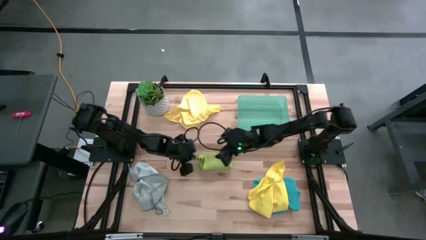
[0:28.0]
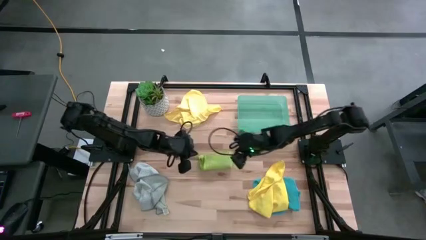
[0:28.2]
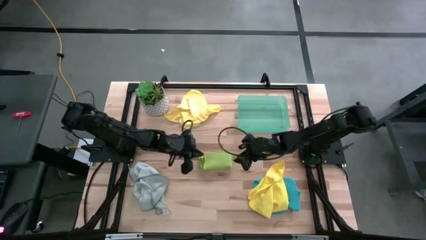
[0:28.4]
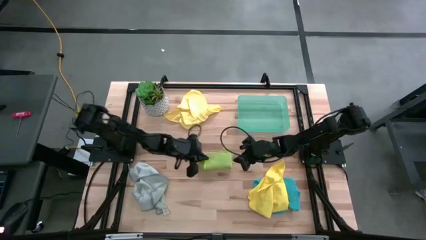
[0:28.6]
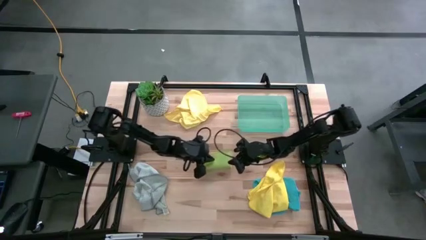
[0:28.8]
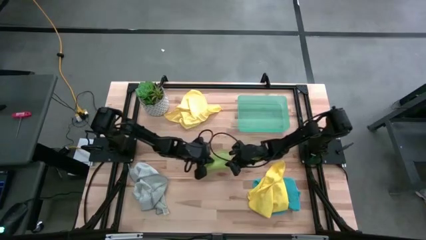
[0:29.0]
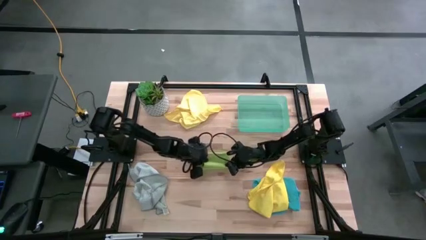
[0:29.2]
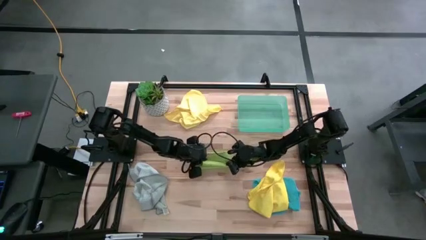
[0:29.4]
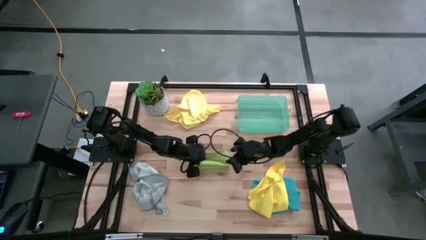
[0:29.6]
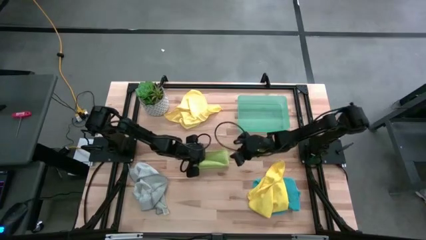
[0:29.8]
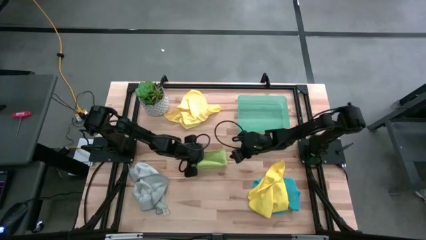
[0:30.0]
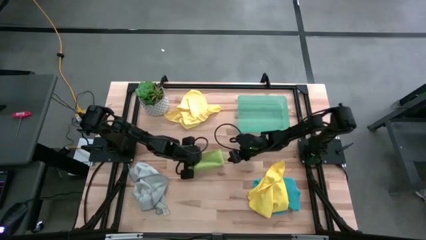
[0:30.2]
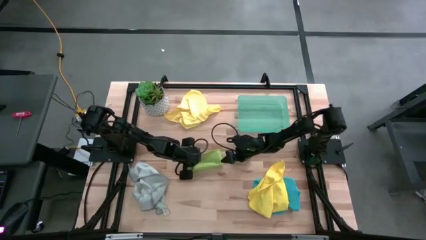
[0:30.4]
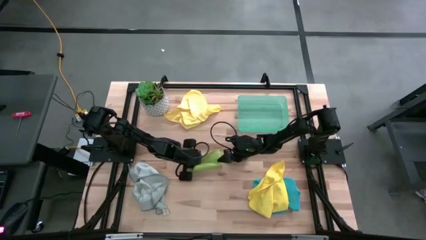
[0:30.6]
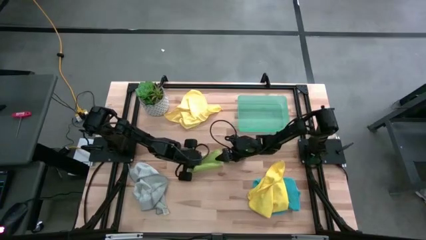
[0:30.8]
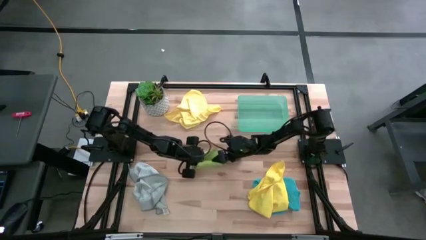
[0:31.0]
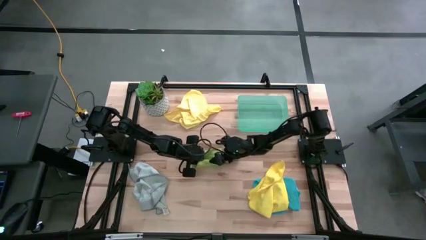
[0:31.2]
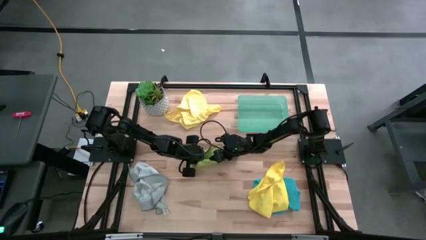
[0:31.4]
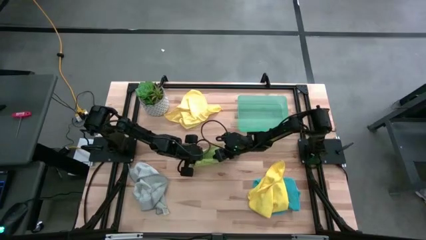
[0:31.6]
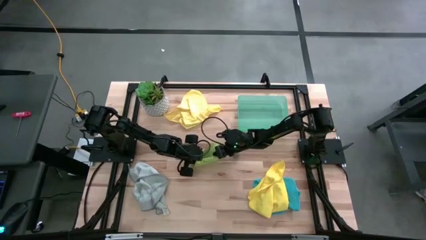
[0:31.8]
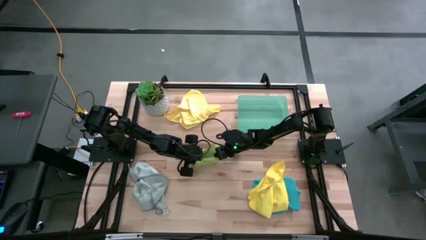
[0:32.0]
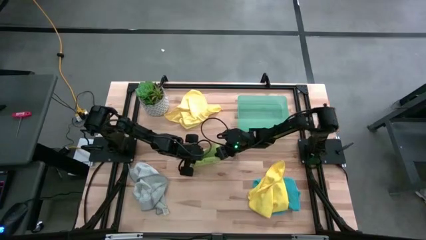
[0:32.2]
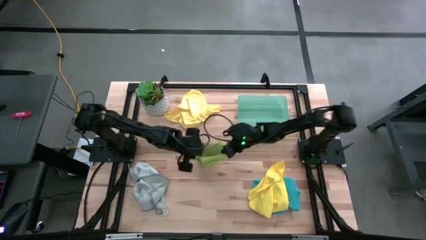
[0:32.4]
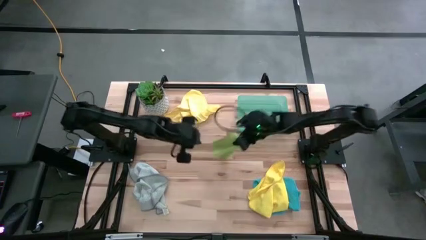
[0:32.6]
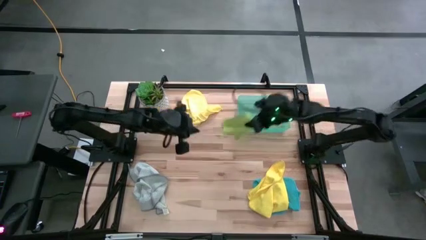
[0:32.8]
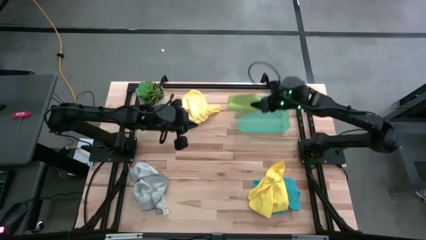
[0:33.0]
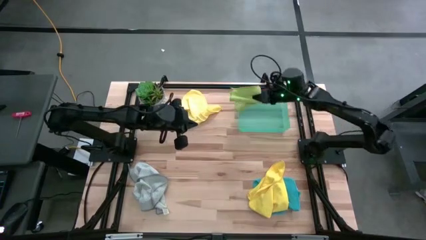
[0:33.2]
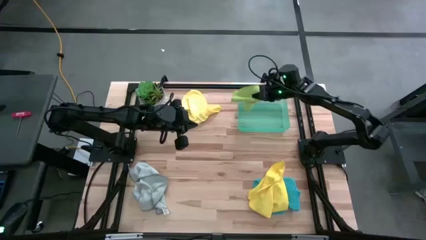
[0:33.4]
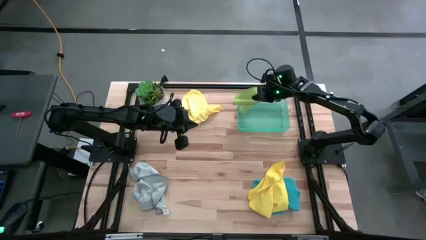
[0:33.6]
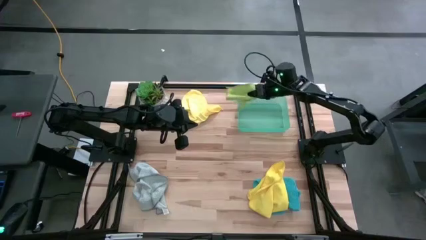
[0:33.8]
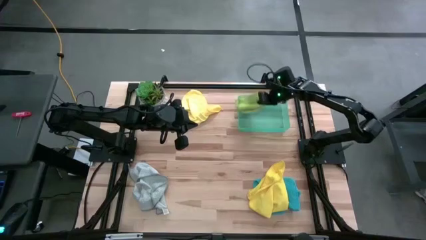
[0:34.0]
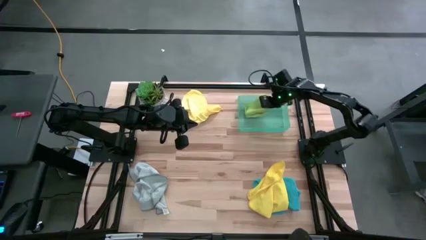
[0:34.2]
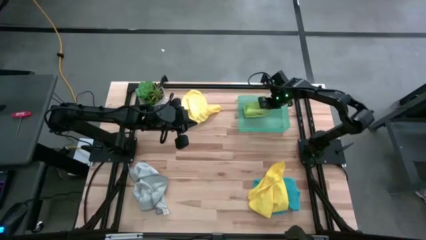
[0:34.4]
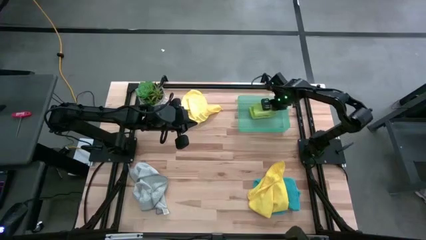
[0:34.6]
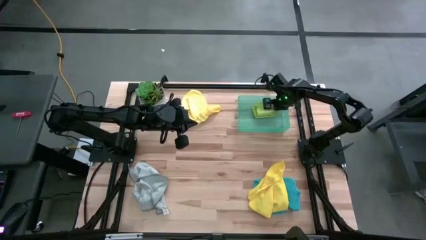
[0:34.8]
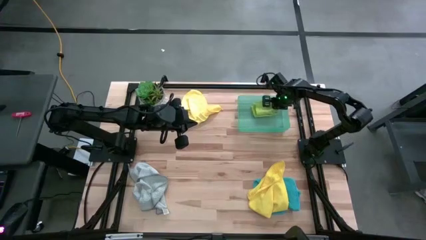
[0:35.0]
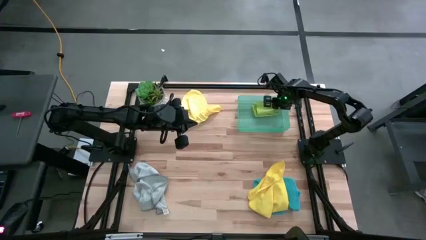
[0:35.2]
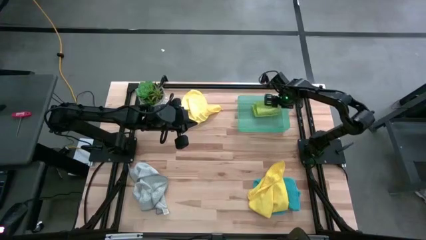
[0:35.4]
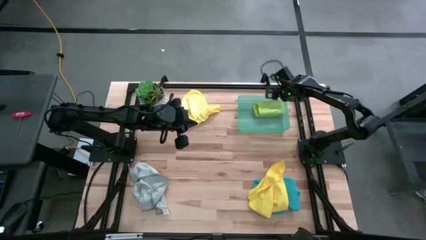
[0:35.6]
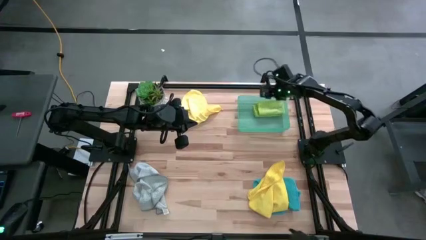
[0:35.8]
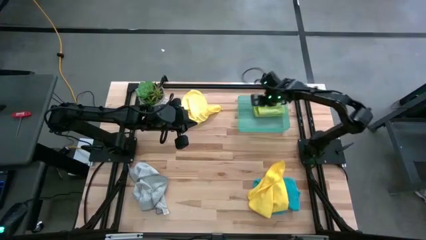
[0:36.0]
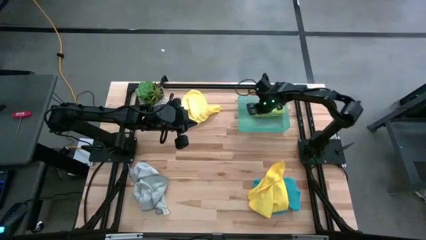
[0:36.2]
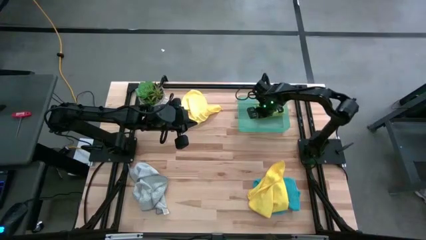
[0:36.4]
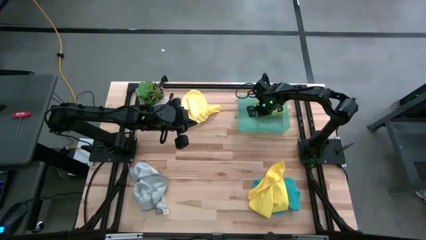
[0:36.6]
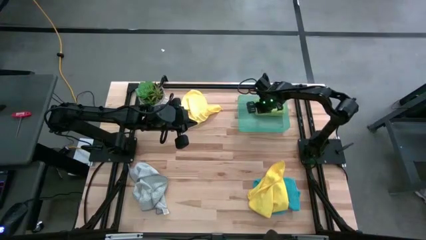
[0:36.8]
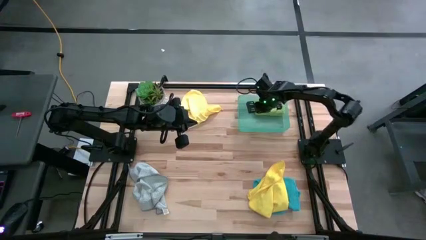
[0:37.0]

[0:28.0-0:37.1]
Task: Fold microfiber towels
Put the green towel into the bin

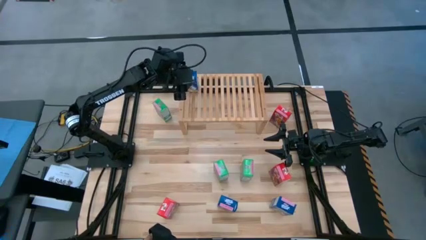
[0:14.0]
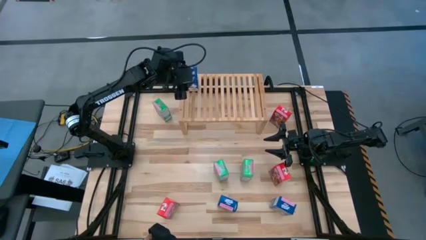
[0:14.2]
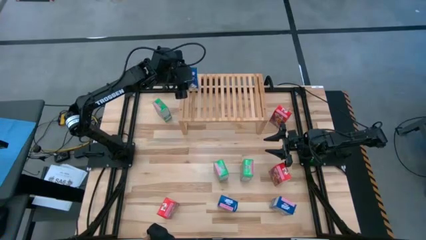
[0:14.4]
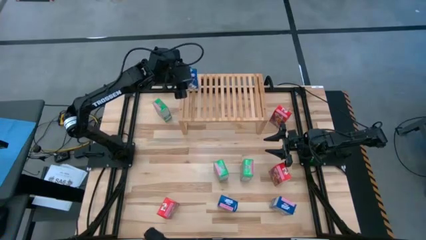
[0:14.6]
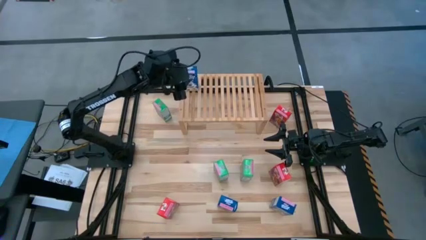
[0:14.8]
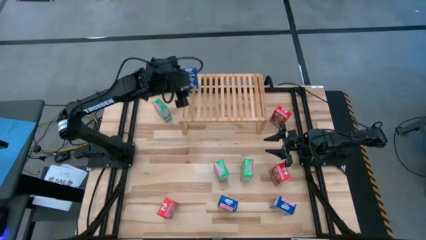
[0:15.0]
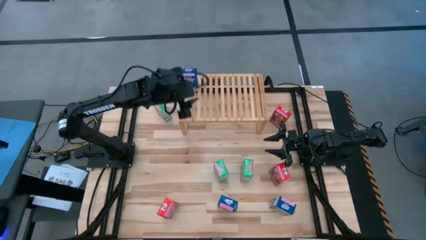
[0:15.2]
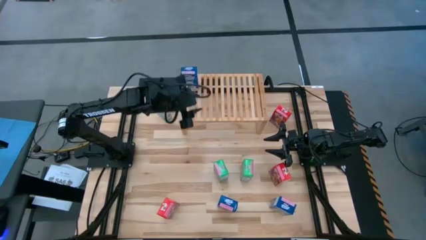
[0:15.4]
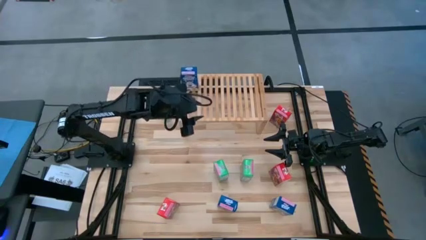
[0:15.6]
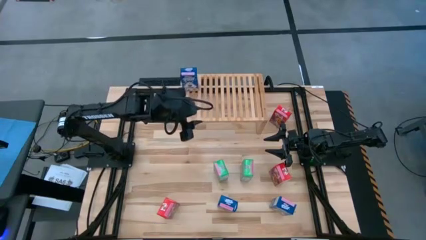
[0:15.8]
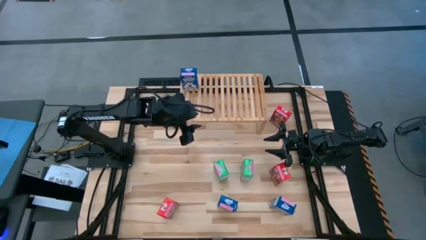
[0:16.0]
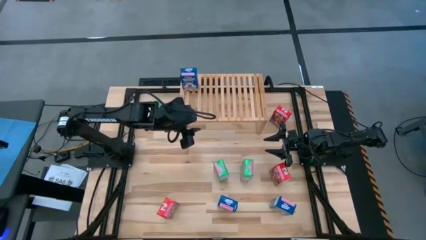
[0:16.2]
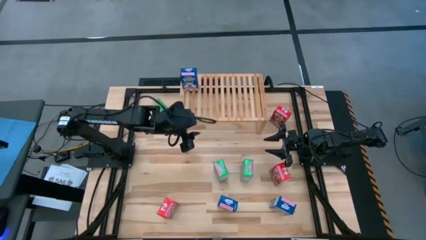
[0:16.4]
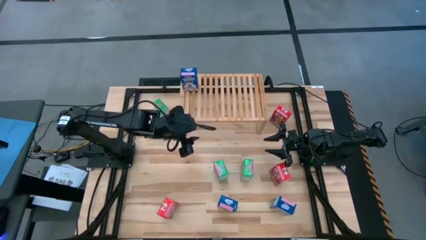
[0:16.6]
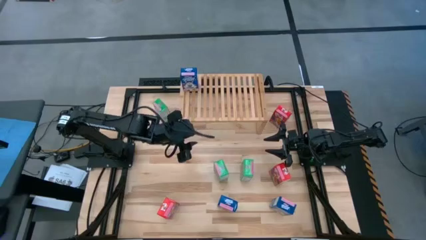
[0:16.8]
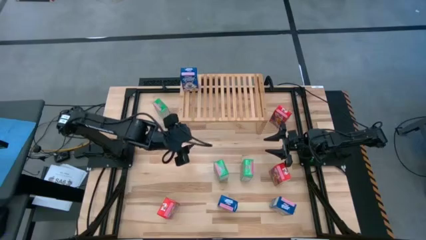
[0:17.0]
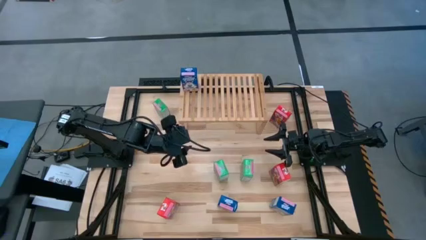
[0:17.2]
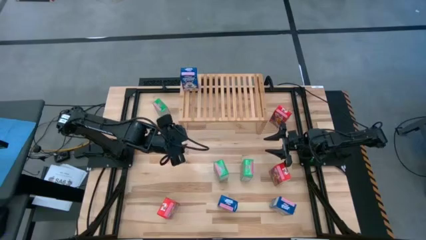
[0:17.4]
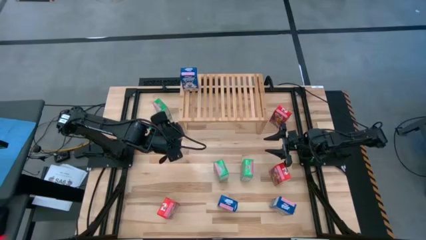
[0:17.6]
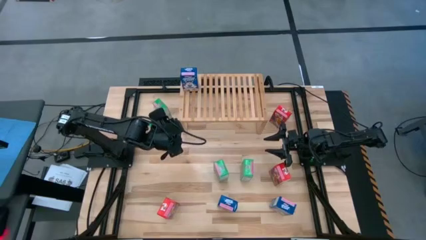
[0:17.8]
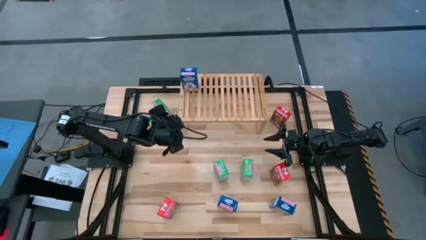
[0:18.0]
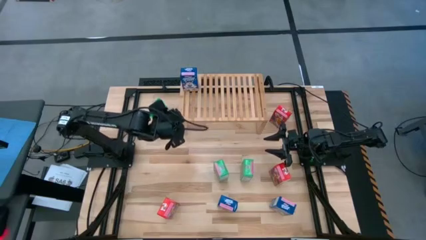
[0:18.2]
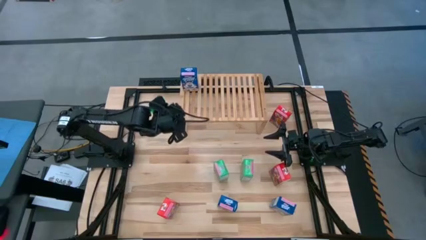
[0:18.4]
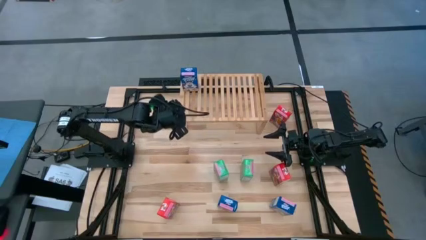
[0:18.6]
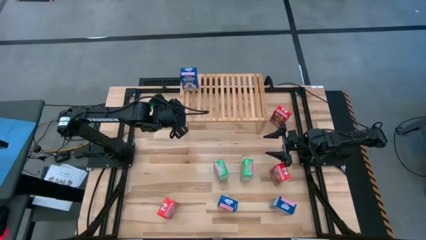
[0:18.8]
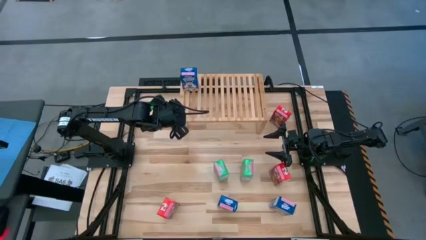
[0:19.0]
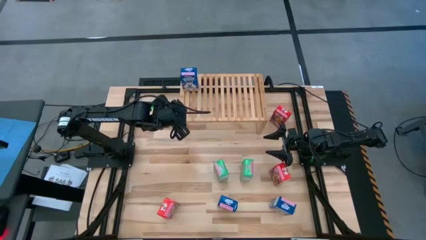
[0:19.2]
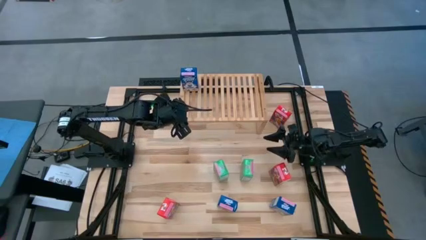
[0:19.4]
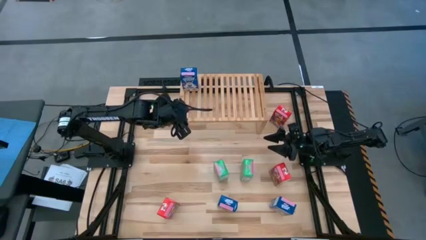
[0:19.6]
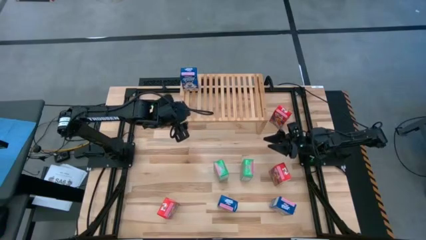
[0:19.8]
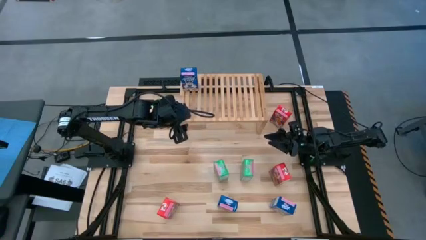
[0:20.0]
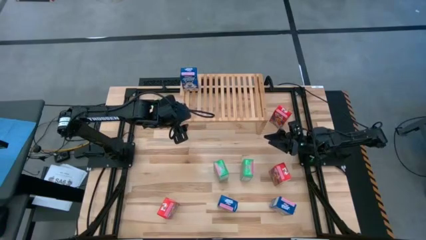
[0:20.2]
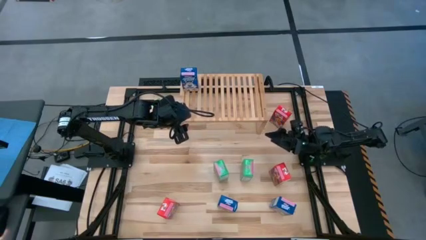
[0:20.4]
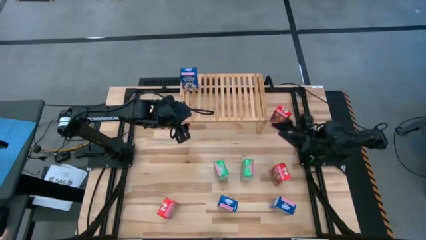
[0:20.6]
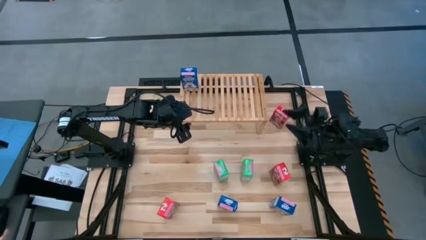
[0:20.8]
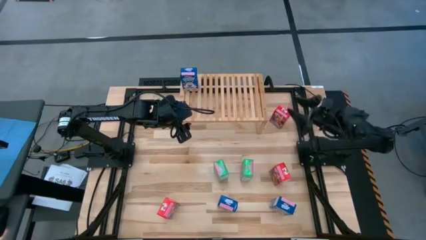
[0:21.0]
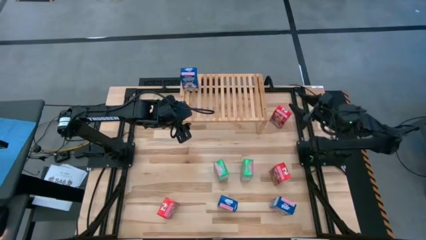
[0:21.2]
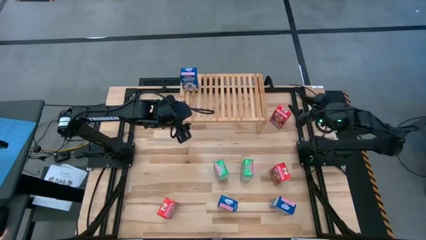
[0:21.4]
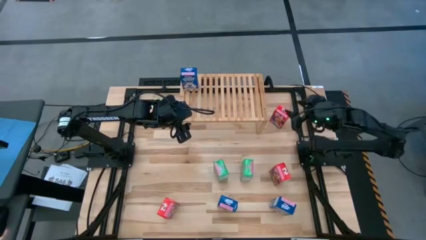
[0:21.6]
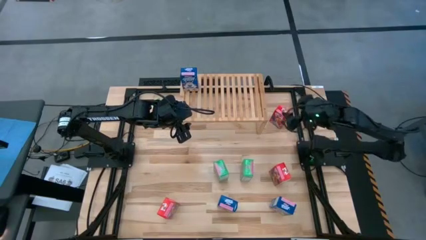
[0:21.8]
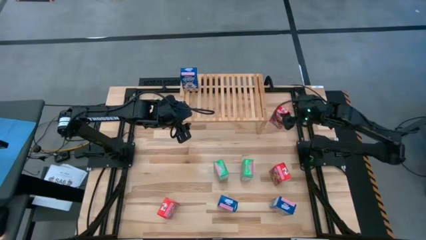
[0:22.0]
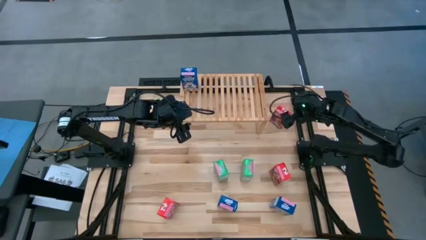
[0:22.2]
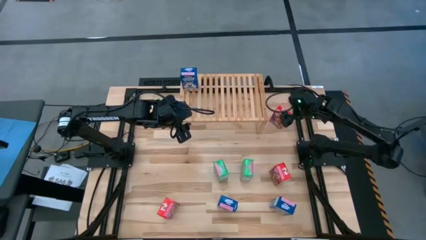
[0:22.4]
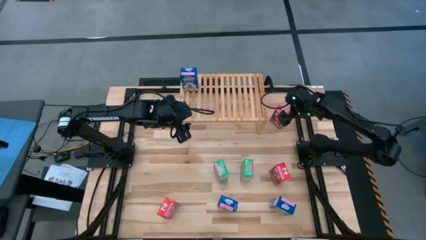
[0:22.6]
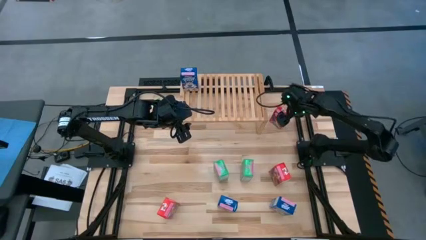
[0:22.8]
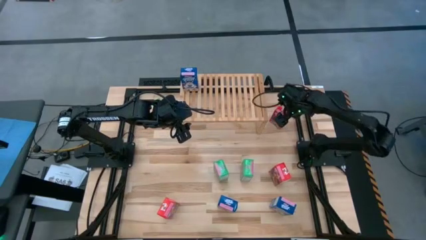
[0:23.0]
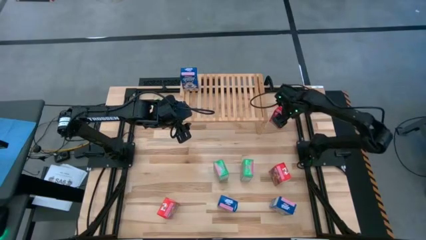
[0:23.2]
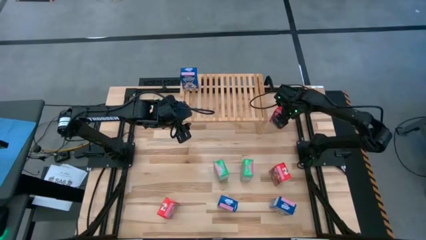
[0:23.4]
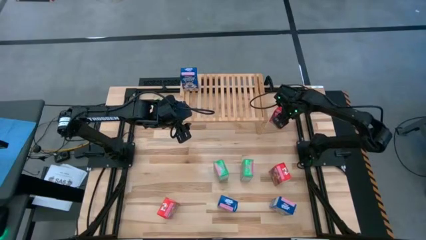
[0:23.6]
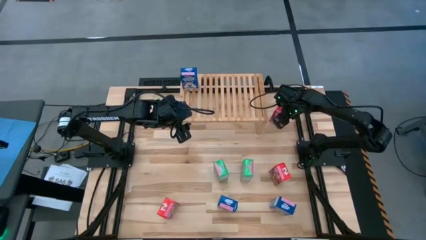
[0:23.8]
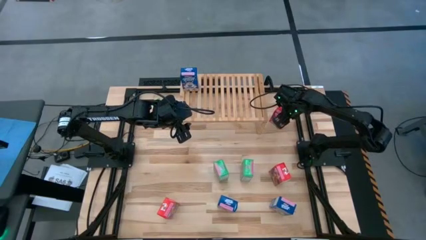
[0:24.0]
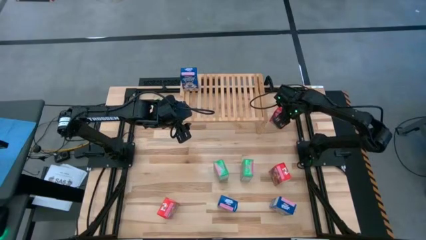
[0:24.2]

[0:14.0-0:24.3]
Task: Stack cereal on shelf
Put the top red cereal box on the shelf
